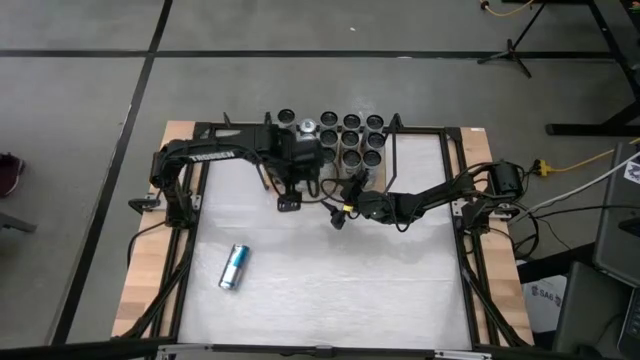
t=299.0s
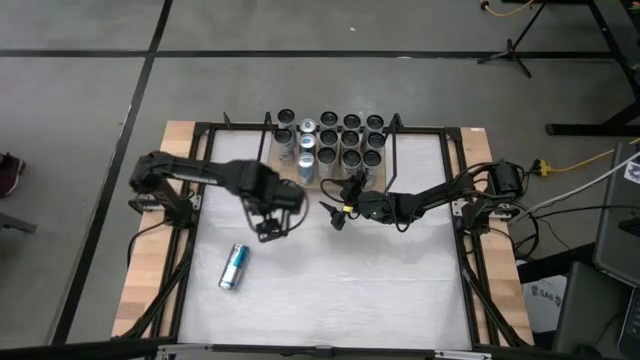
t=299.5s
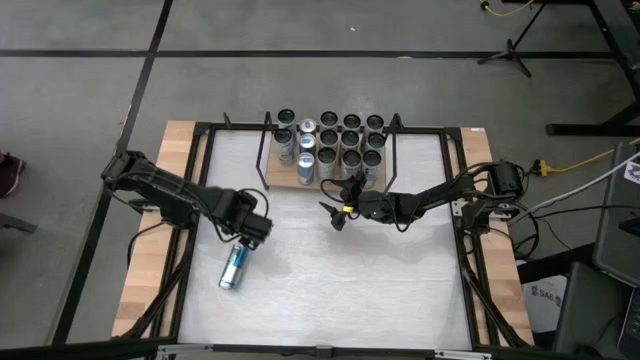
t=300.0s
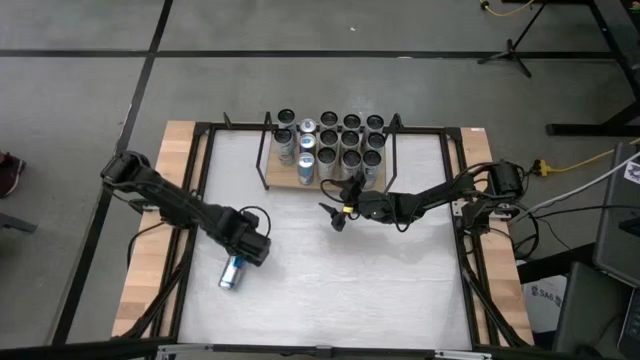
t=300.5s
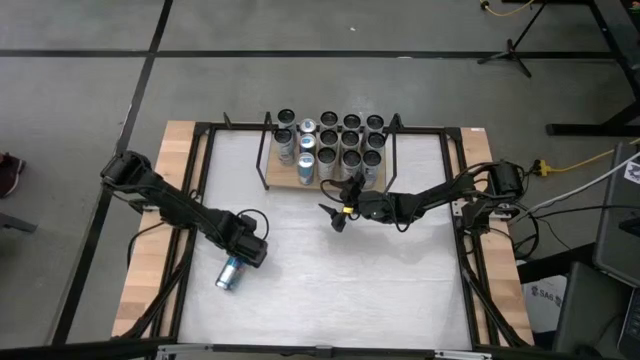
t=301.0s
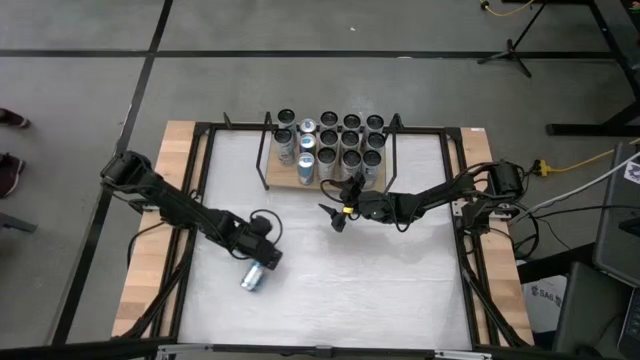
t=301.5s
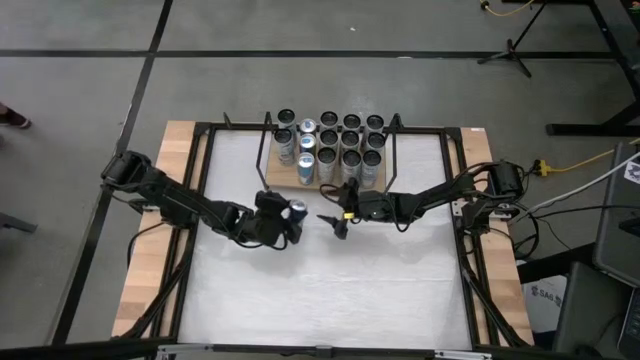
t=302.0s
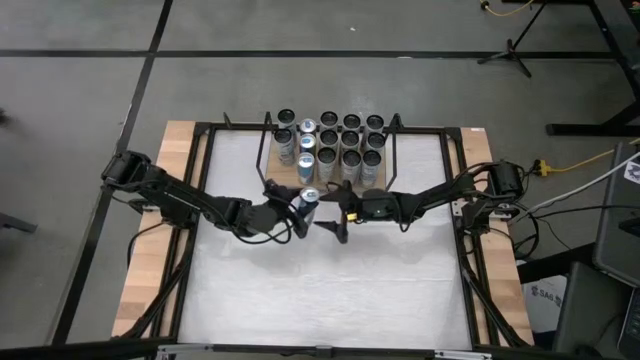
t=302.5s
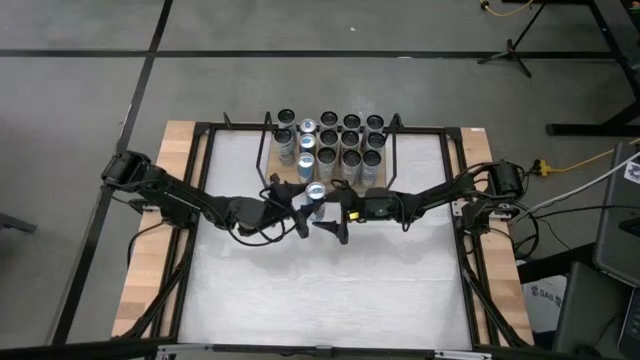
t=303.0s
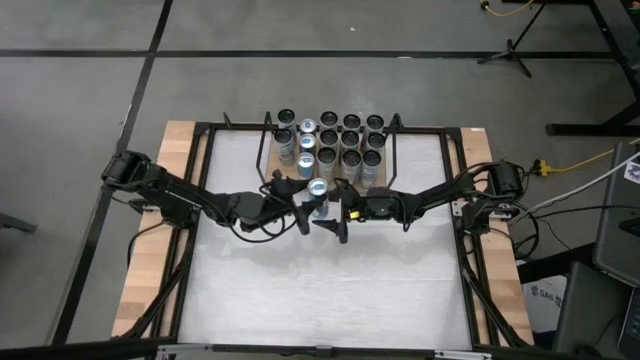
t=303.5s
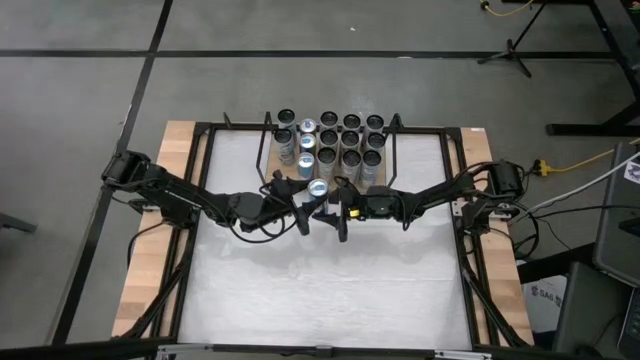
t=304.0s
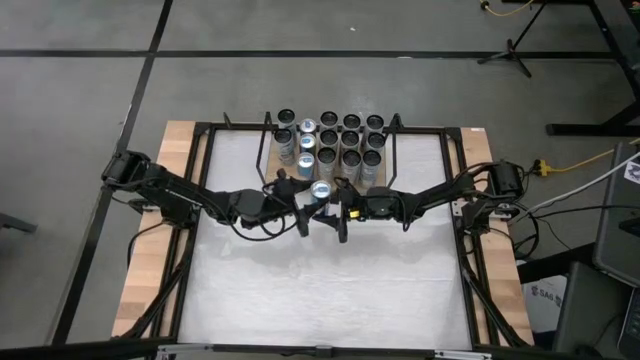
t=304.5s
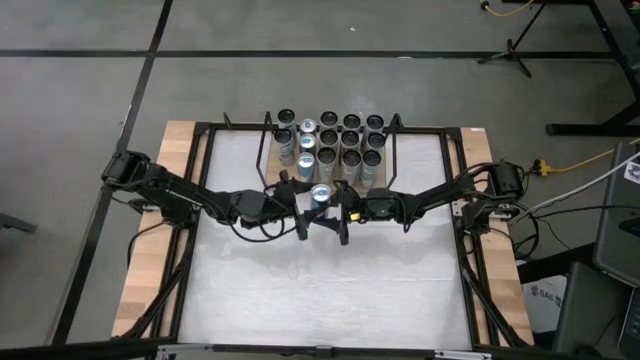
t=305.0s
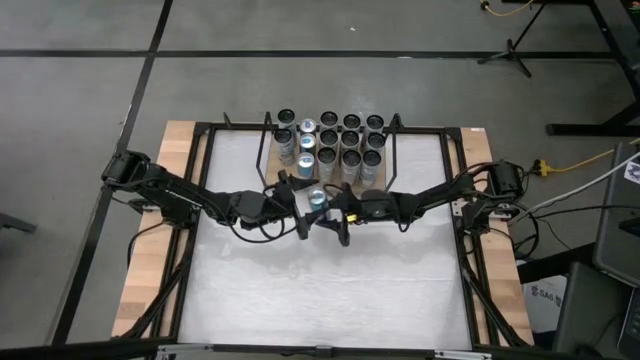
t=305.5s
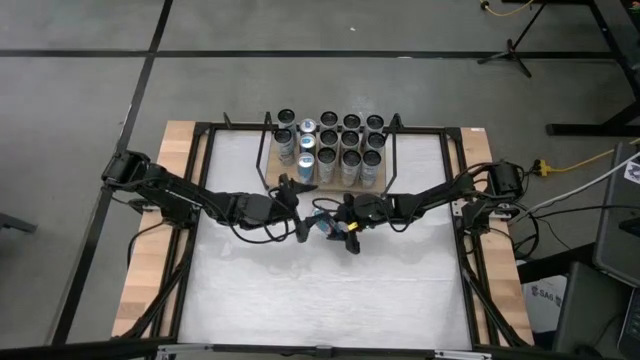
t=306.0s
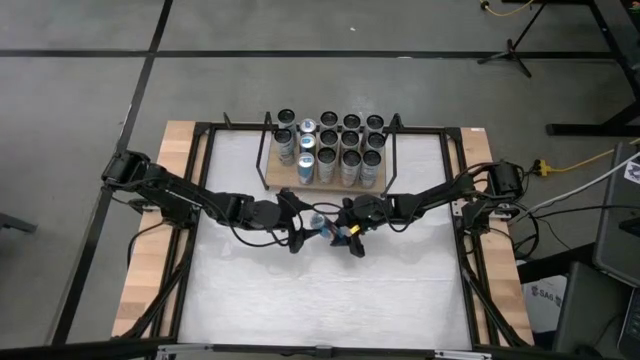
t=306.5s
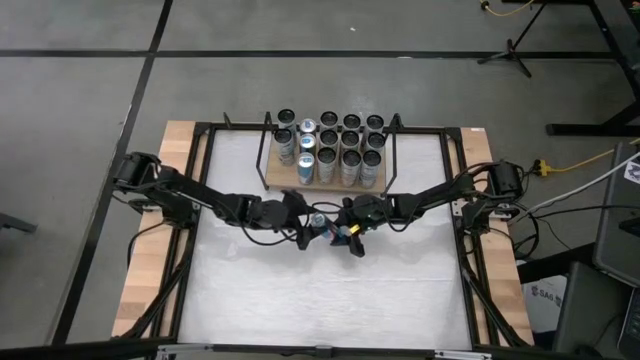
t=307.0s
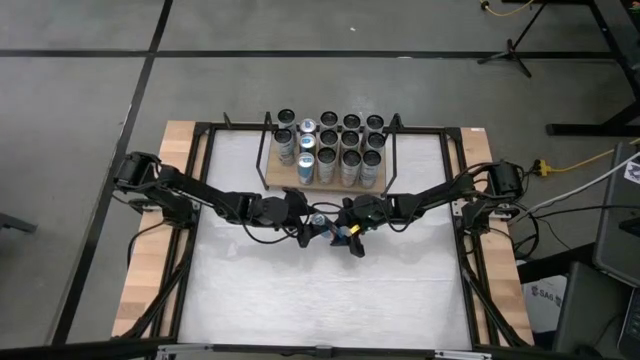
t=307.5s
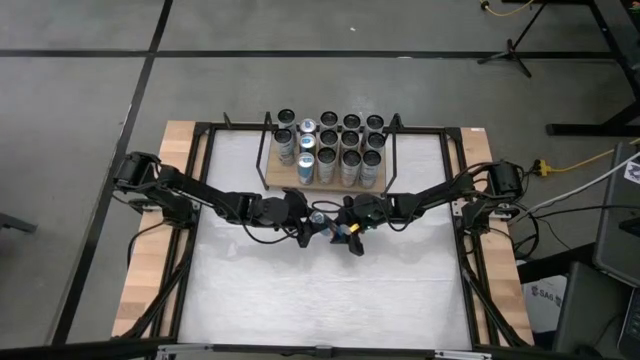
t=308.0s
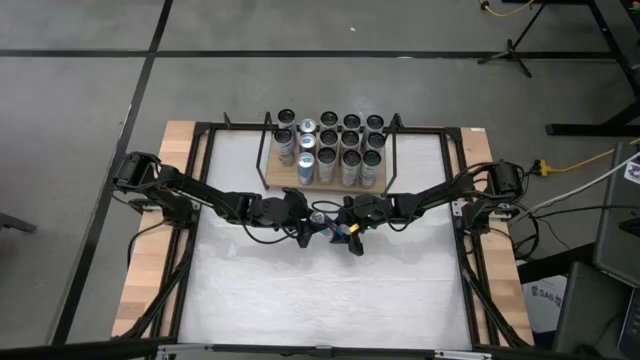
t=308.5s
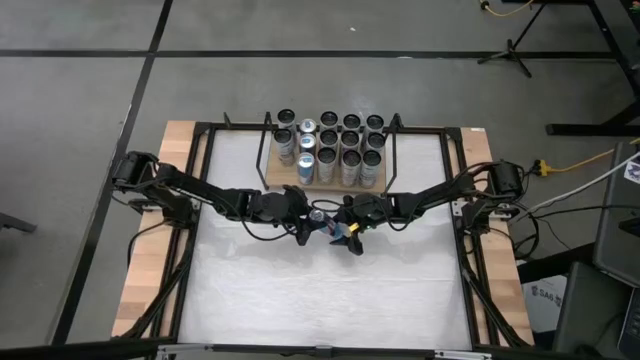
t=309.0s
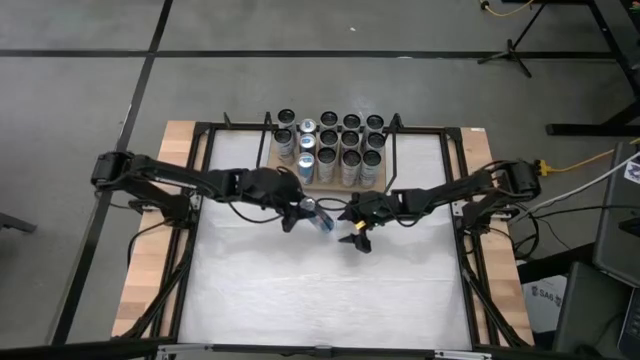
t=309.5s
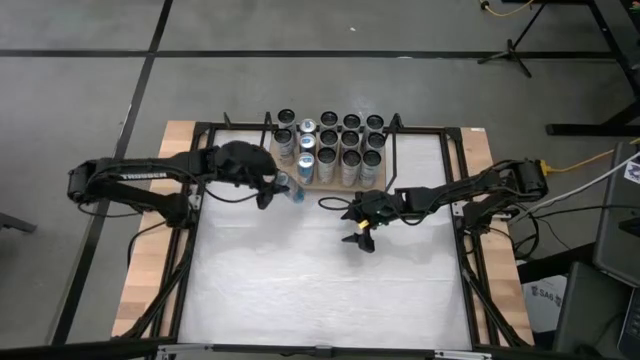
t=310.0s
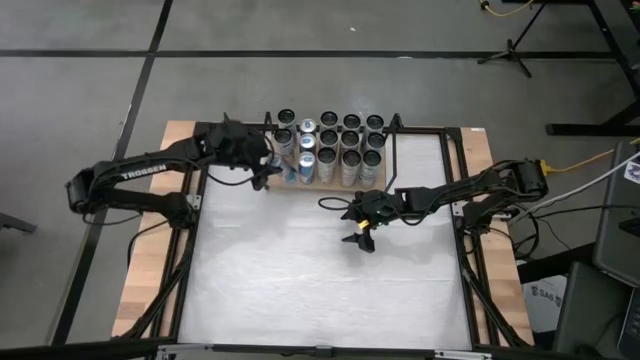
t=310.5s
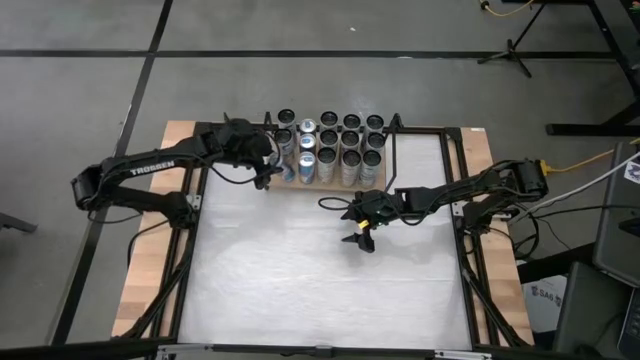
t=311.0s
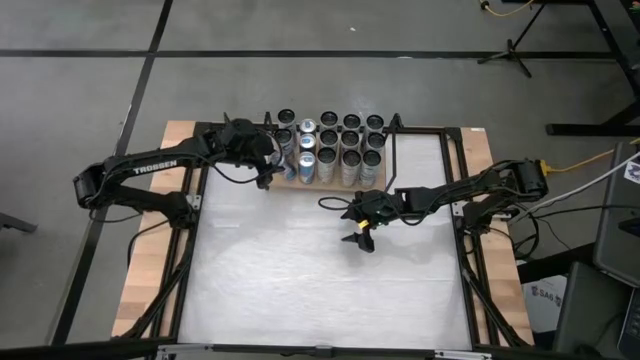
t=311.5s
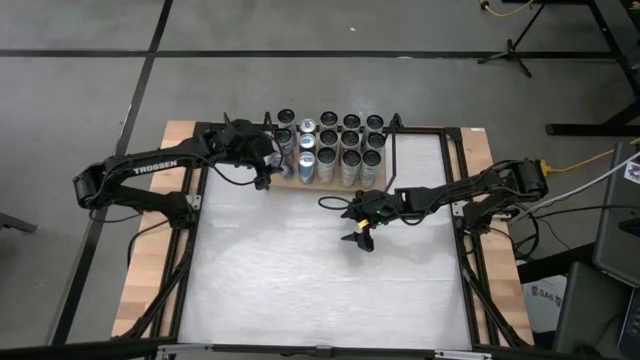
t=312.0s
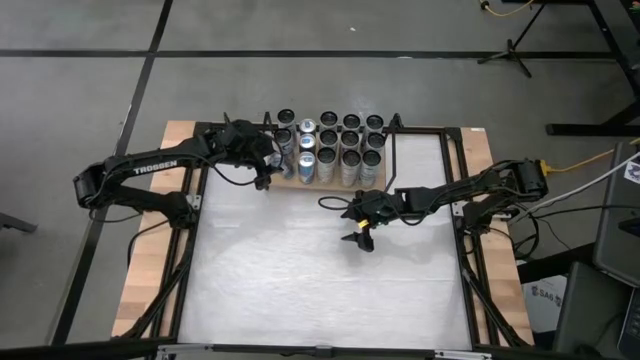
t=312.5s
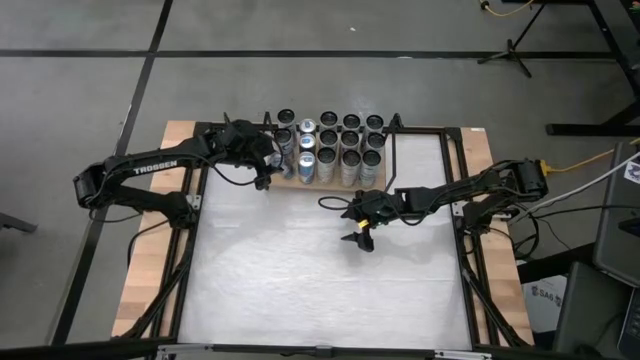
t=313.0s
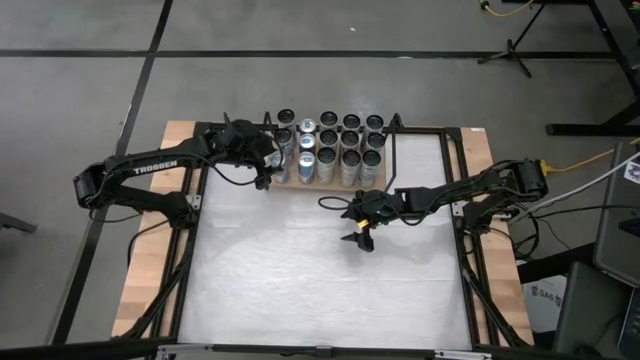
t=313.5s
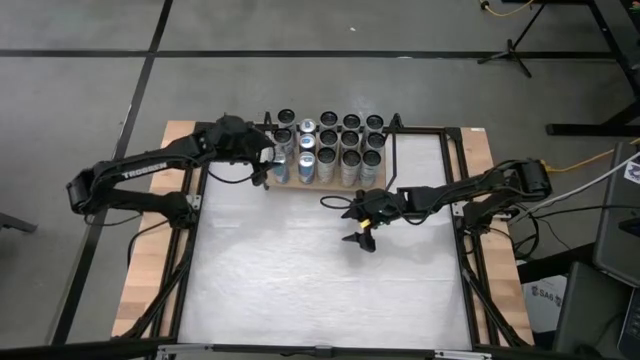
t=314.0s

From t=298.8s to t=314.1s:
Task: Place canned beverage on shelf
Put the blue soda can aligned with the other white soda can on the shelf

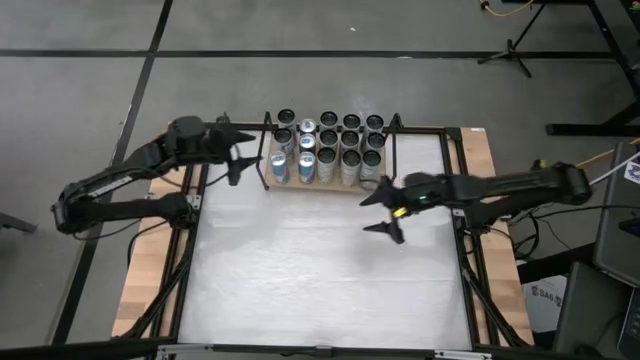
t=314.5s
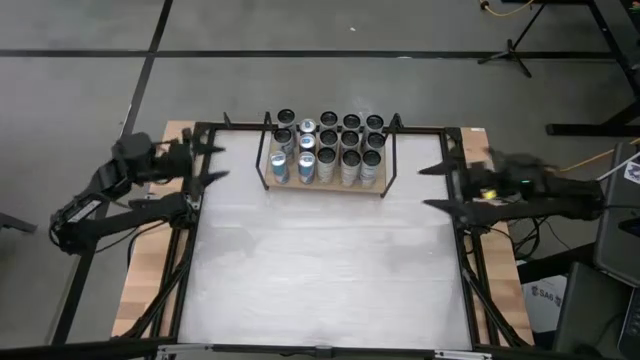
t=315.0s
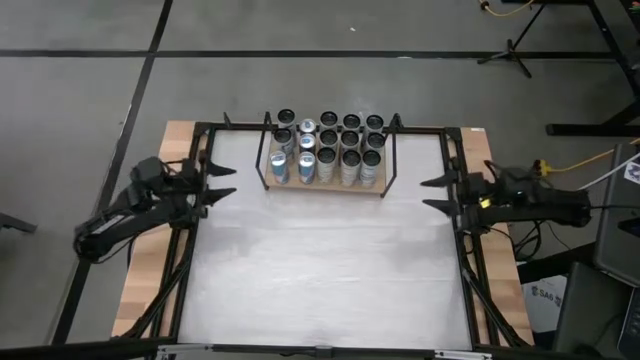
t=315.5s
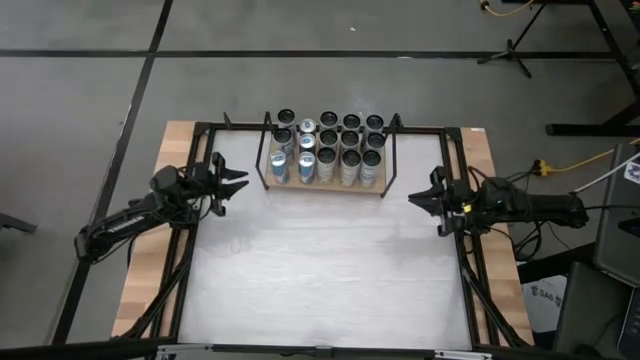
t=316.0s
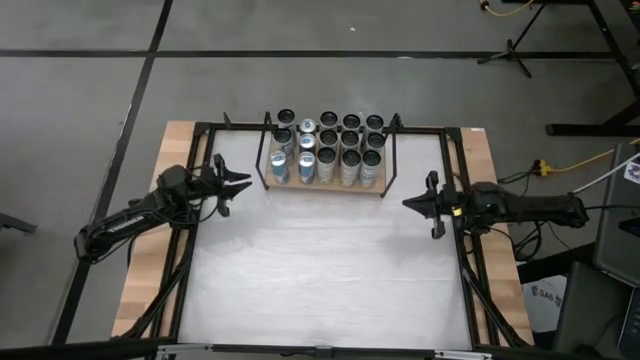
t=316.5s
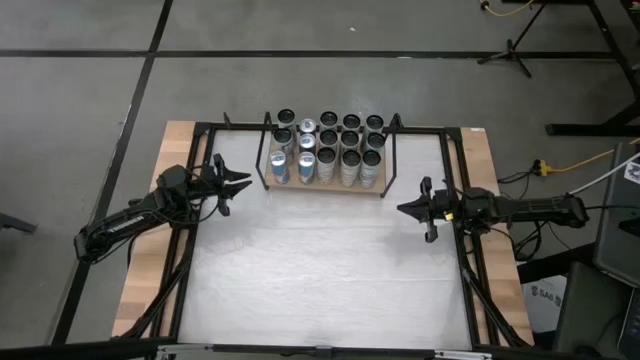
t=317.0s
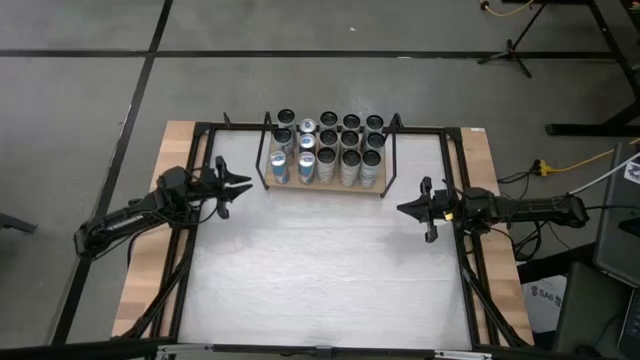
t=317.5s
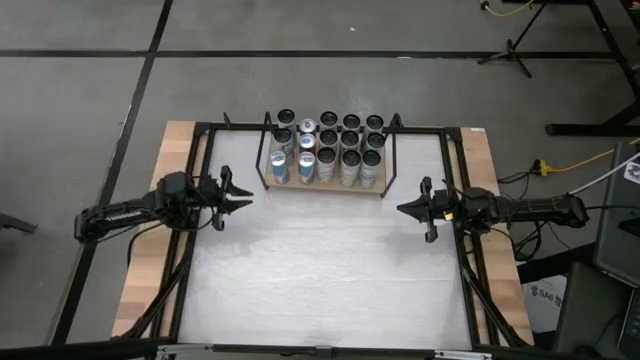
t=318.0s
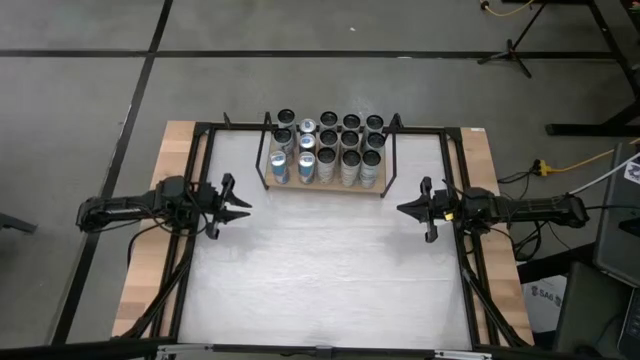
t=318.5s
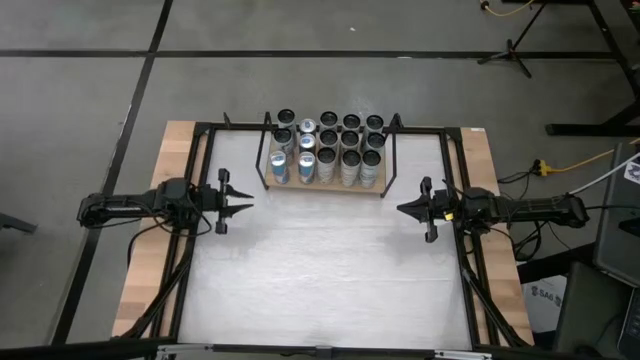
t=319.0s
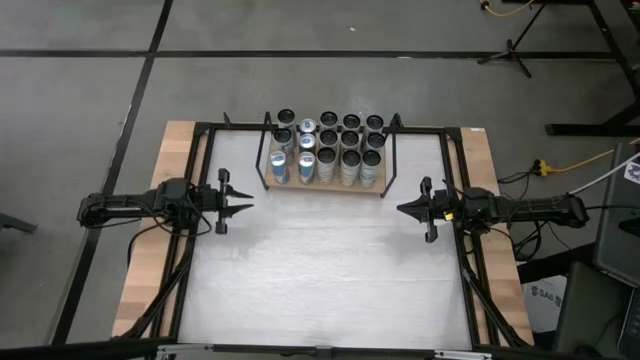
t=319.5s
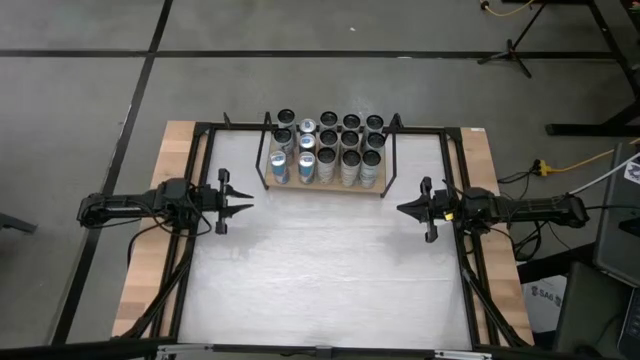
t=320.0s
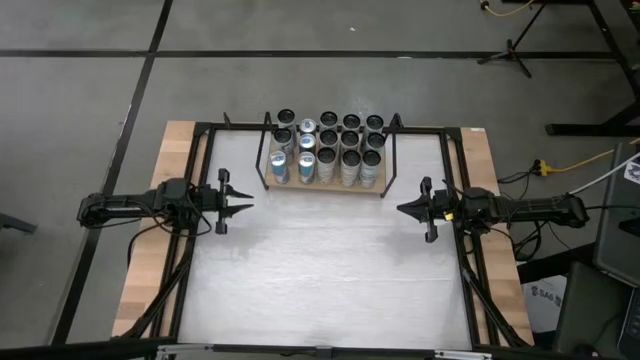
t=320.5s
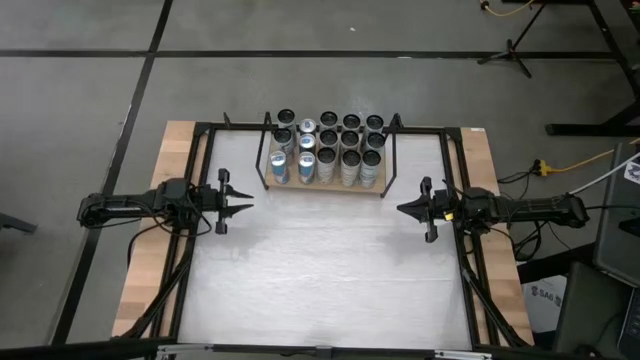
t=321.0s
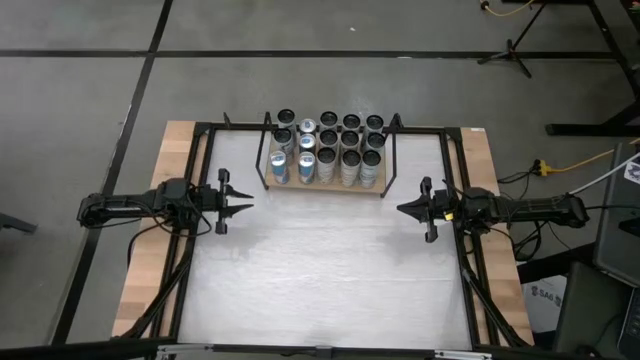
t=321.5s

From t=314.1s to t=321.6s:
Return to Home Position
